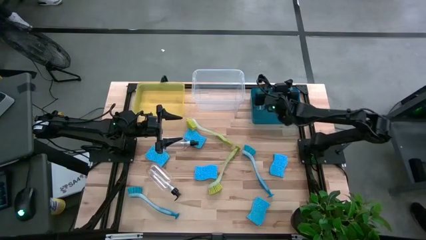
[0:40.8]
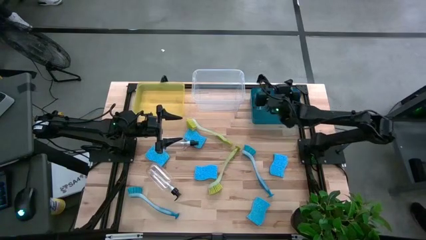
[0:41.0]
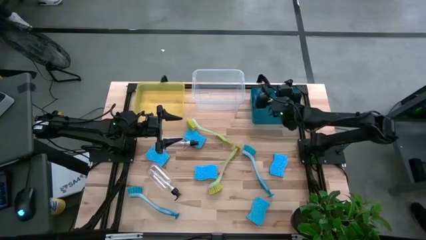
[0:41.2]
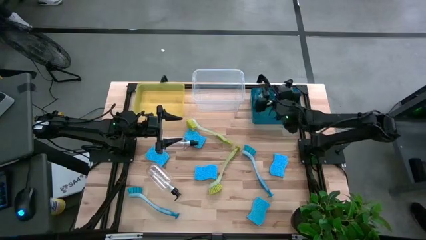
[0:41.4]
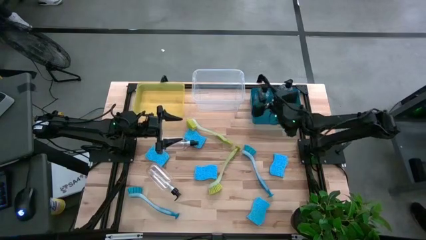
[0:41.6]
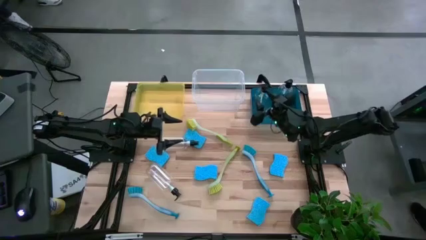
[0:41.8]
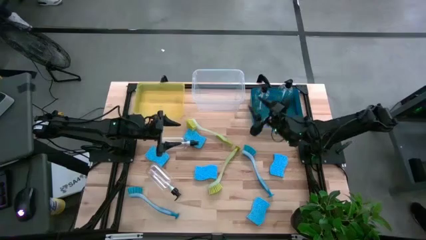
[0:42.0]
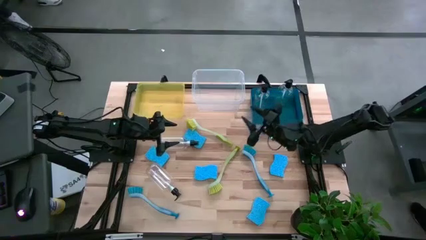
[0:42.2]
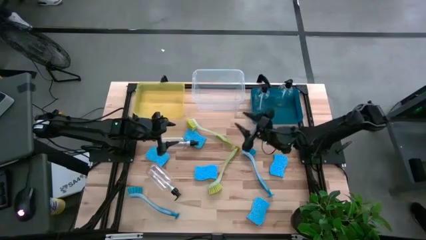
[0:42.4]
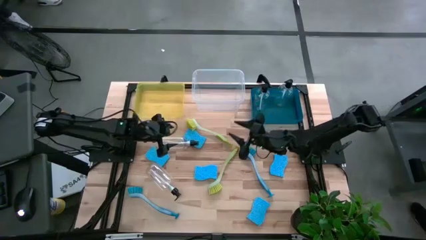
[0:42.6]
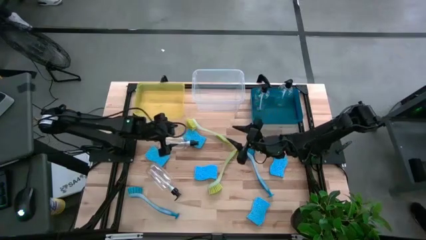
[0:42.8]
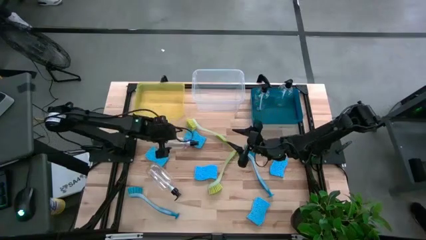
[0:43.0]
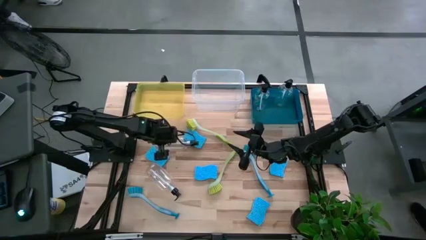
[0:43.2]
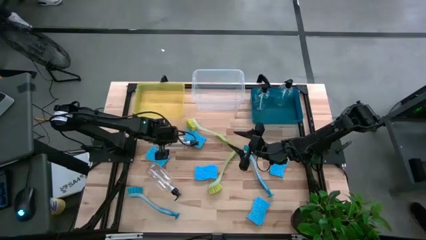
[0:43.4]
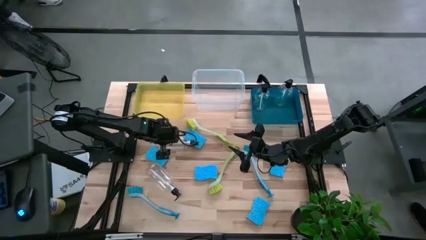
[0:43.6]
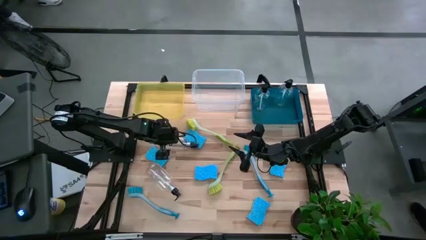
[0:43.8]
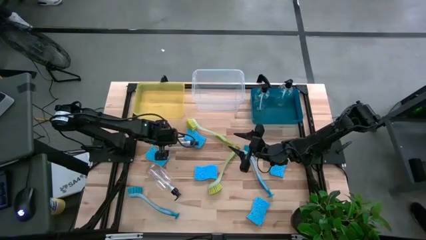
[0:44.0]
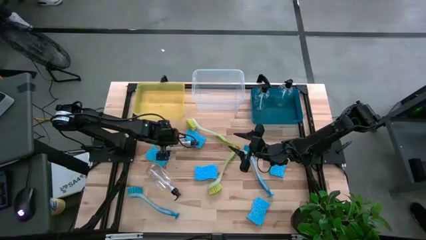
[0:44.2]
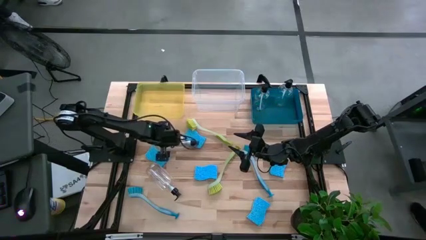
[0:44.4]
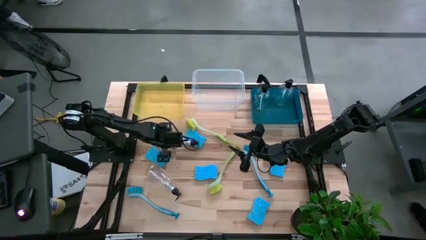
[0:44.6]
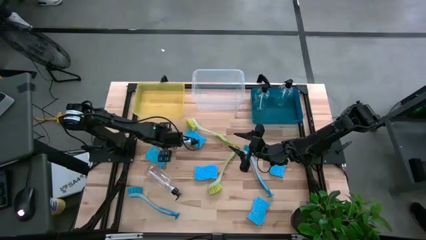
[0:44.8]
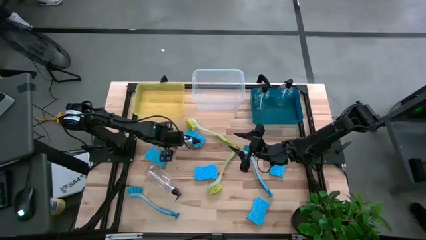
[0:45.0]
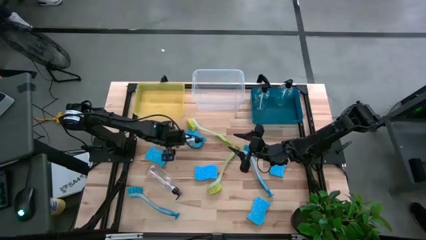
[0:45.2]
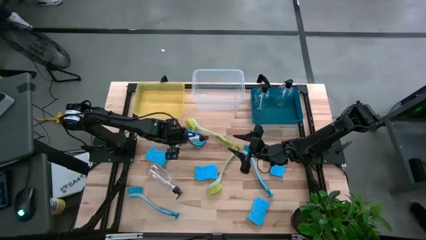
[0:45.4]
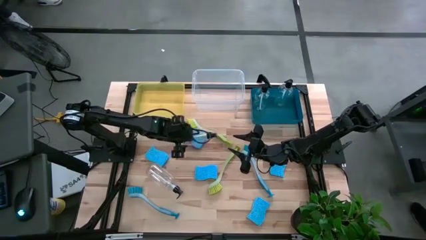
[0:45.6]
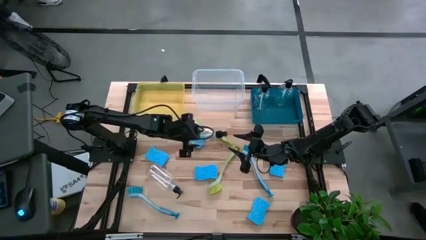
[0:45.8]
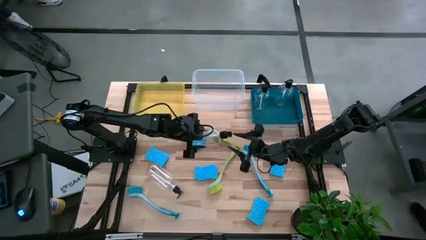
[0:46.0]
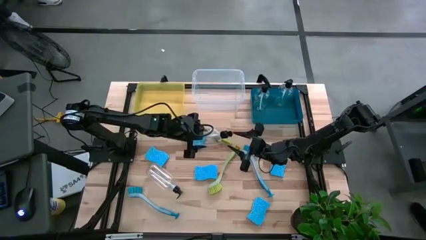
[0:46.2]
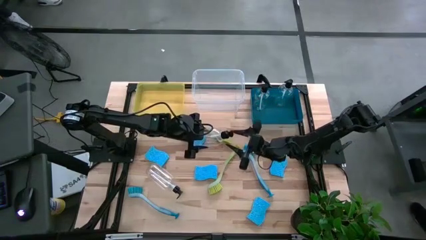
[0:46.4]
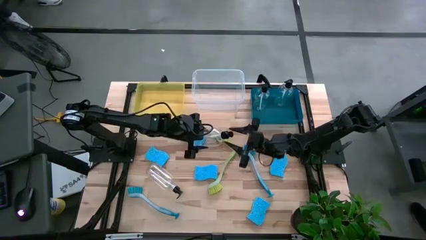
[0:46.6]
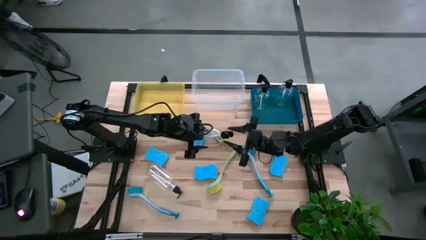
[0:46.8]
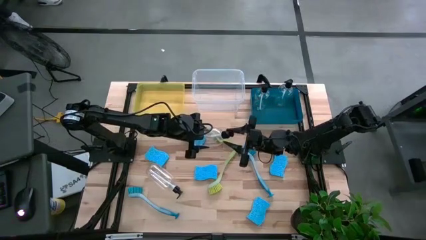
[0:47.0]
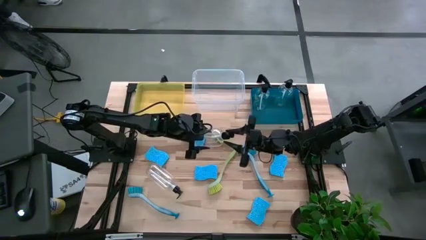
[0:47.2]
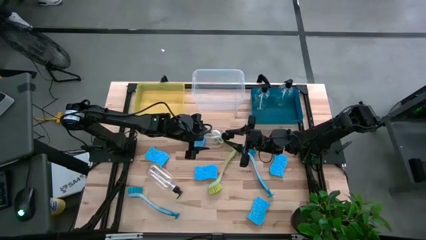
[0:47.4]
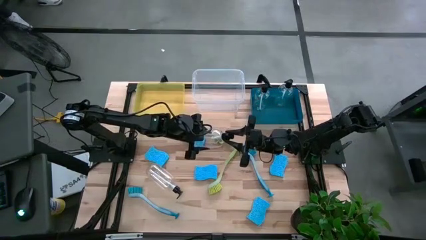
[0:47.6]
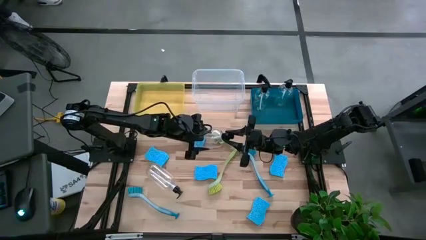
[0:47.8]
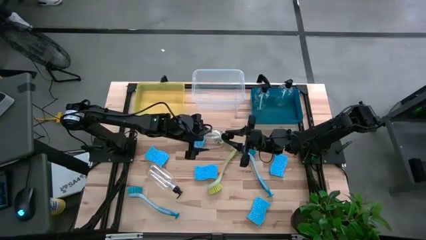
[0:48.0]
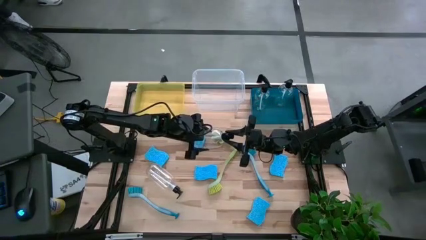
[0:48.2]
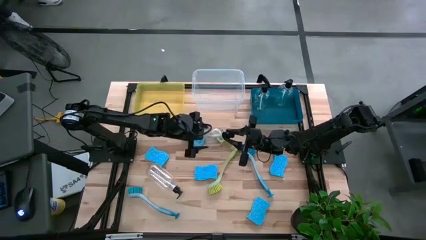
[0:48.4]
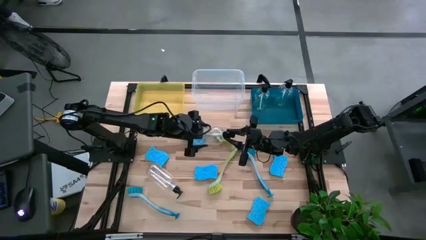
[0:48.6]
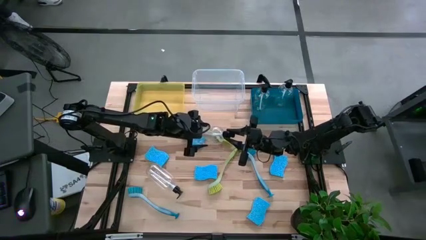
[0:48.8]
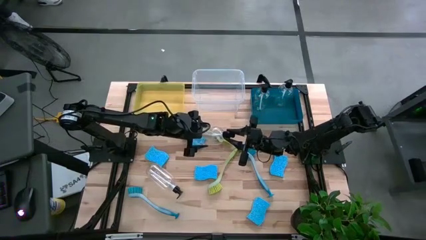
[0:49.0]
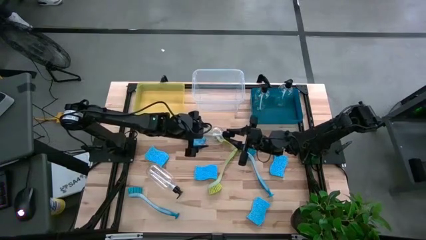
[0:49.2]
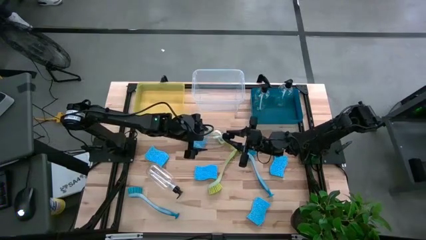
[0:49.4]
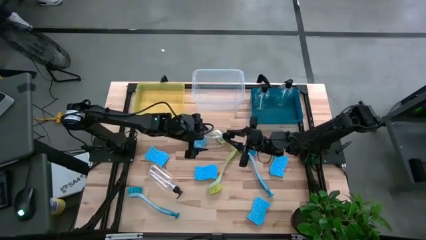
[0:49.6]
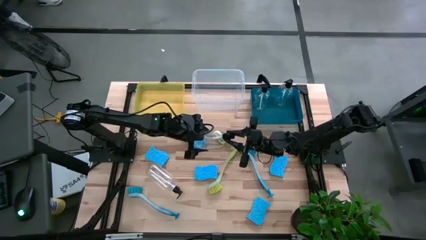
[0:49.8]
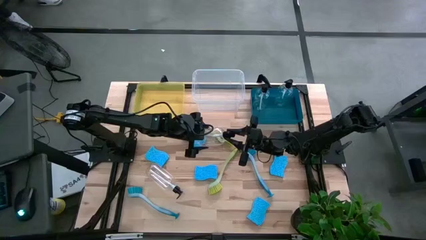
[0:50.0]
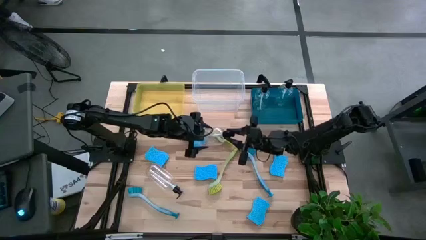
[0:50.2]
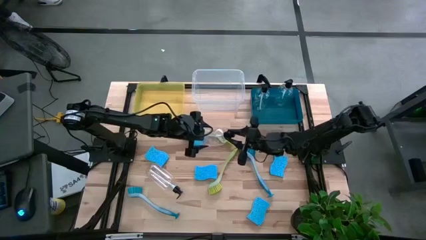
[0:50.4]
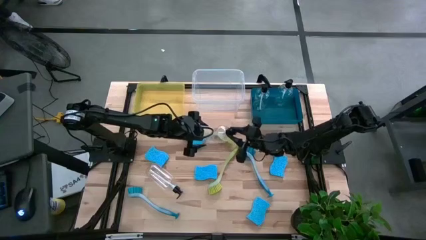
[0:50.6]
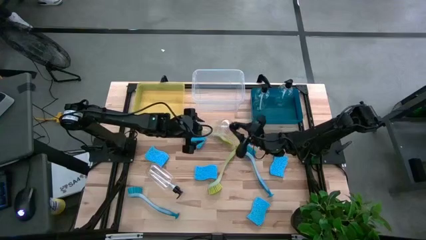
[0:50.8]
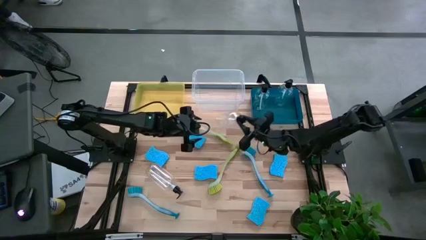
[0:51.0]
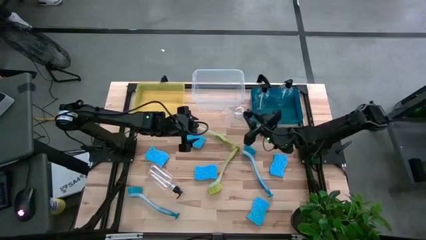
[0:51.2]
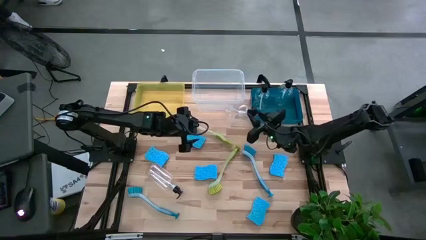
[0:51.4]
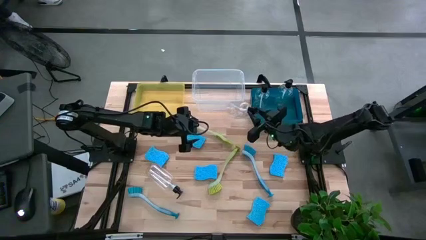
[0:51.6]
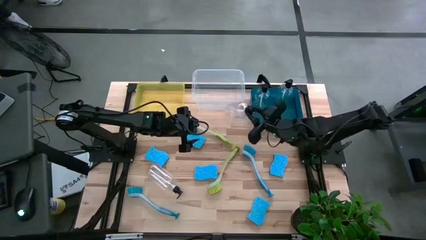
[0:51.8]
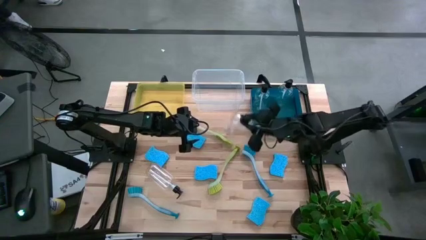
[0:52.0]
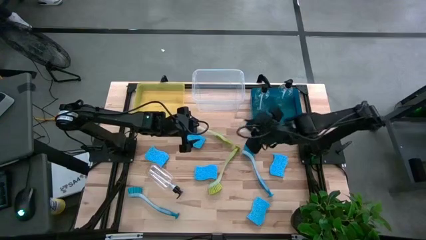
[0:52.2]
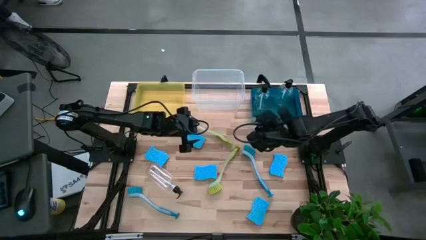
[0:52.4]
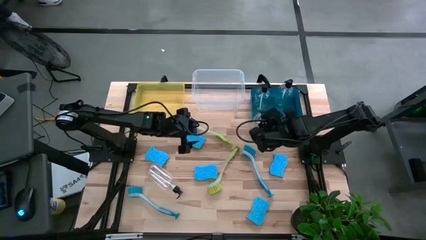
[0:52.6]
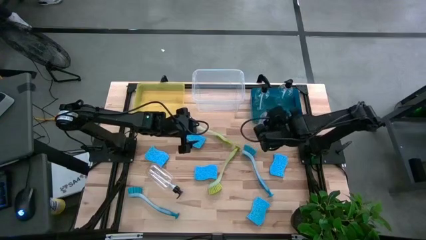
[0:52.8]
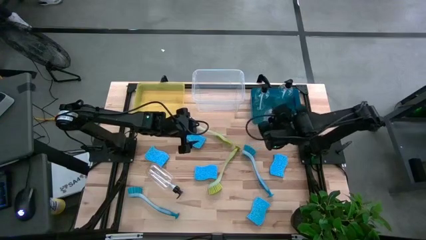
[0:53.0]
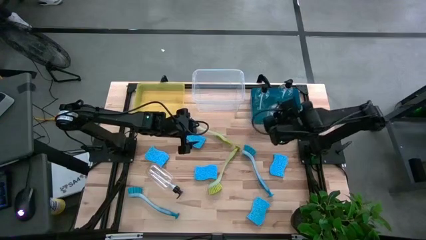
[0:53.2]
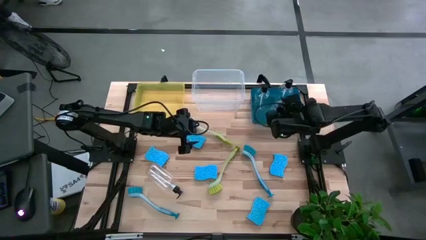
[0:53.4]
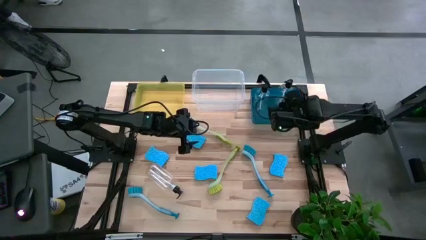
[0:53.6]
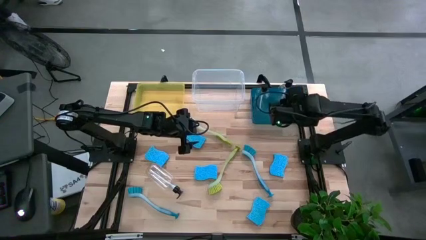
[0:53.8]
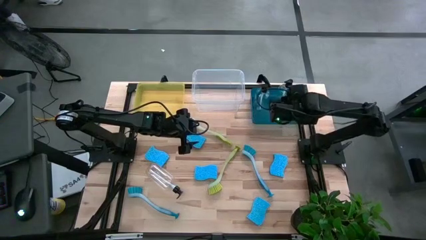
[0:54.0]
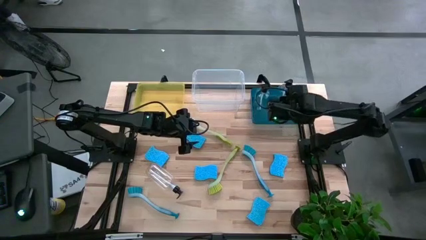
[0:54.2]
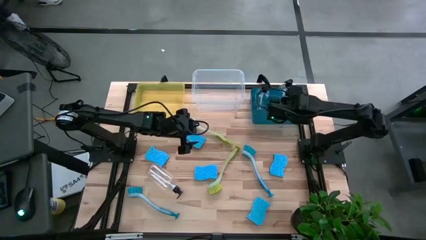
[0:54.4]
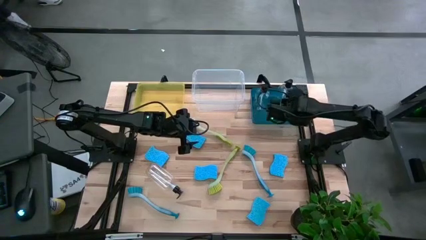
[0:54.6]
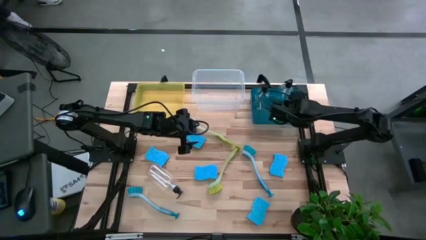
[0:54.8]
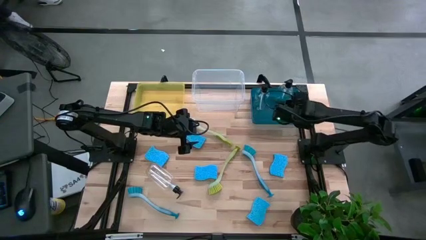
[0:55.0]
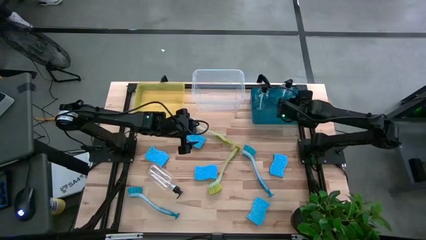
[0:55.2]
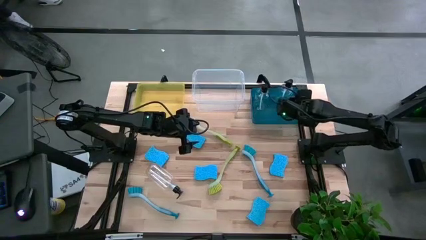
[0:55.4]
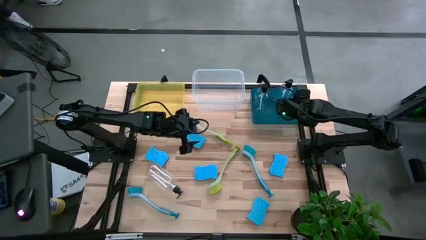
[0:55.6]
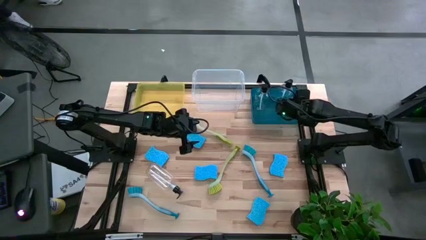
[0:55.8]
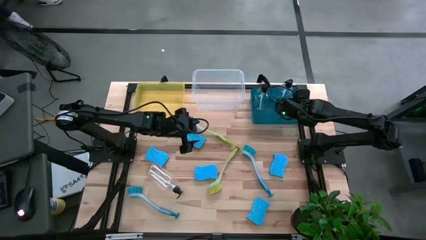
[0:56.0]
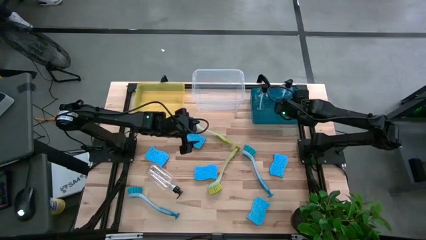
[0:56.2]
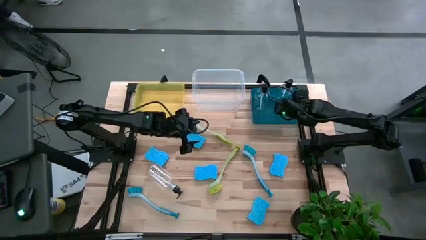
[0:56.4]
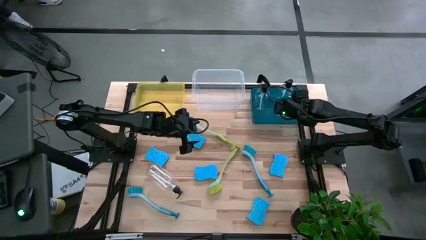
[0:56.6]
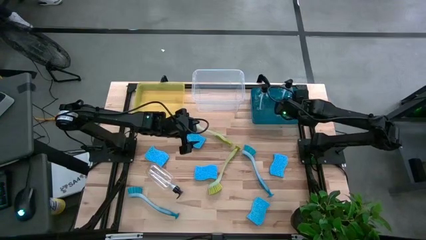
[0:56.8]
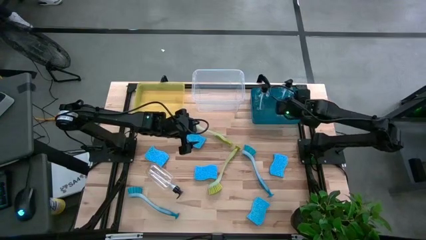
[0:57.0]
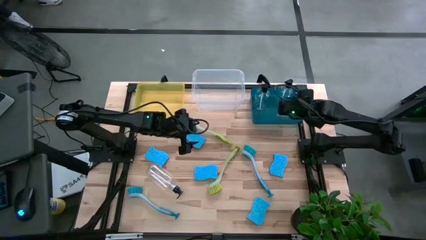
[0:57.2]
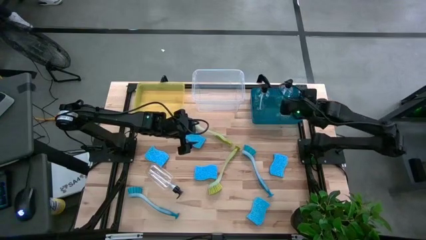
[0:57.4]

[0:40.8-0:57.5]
Task: Pick & Place Kitchen Sink Supplies
Put the transparent spray bottle into the blue bin
